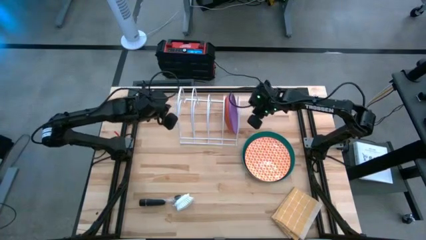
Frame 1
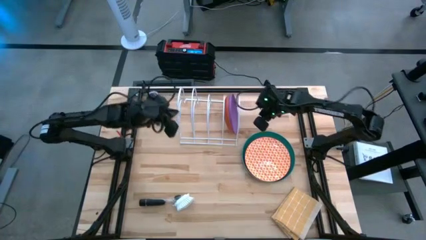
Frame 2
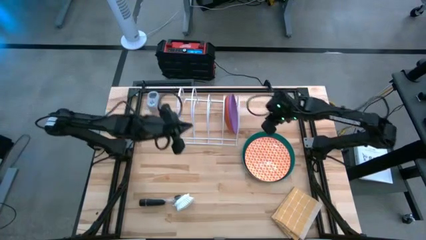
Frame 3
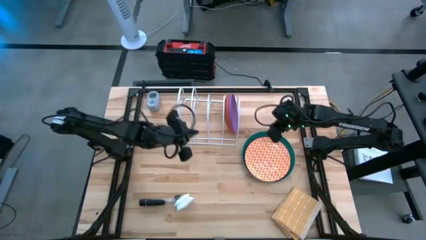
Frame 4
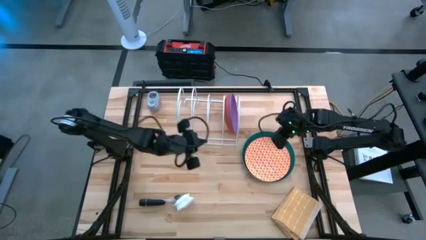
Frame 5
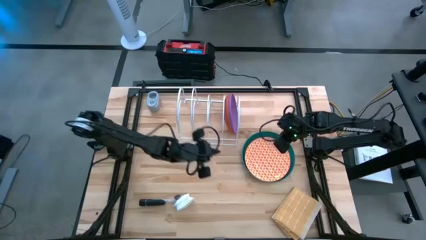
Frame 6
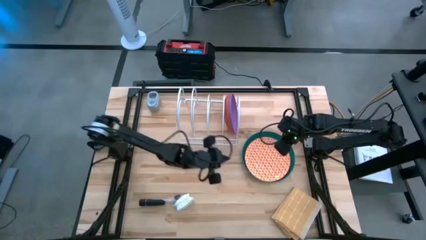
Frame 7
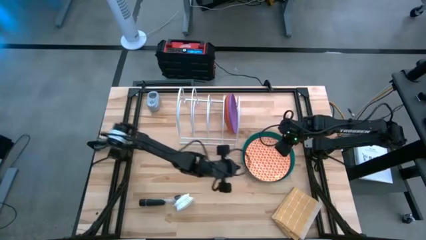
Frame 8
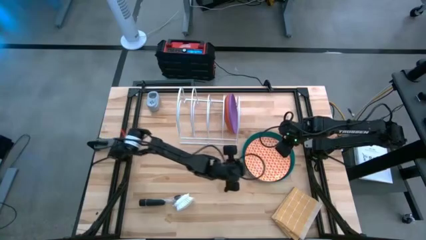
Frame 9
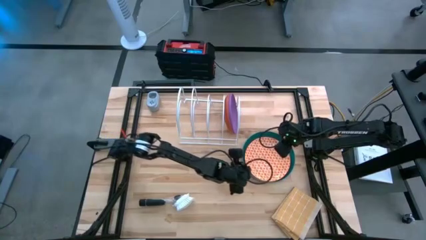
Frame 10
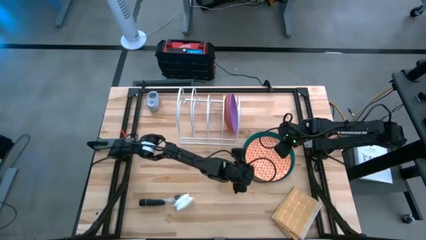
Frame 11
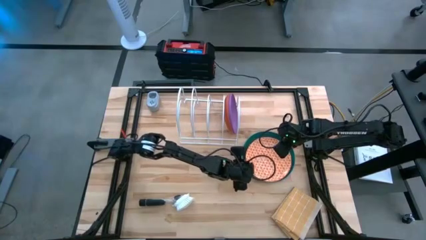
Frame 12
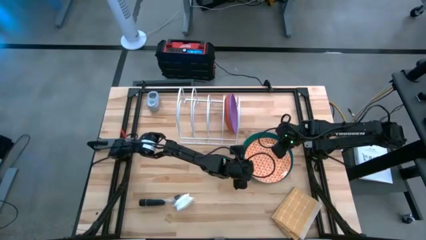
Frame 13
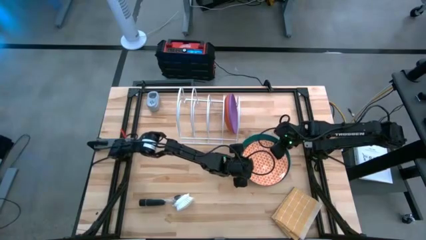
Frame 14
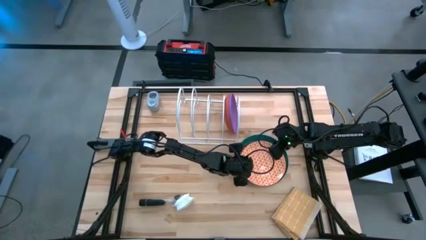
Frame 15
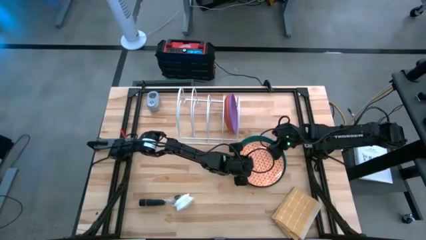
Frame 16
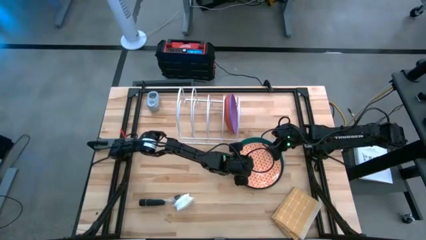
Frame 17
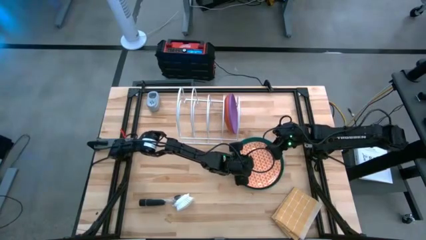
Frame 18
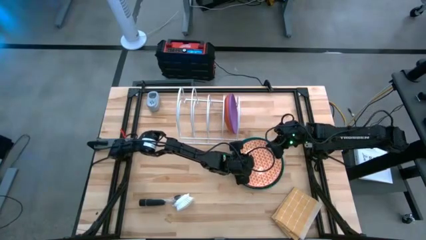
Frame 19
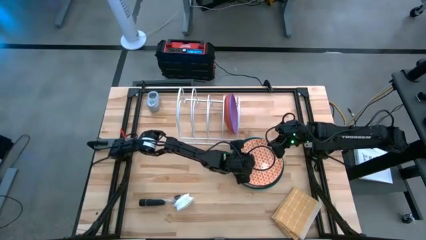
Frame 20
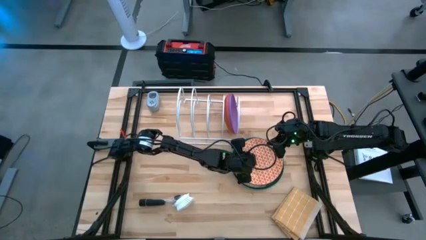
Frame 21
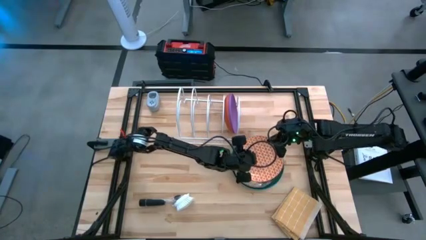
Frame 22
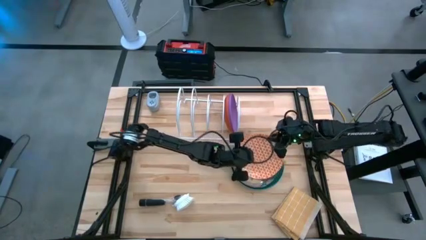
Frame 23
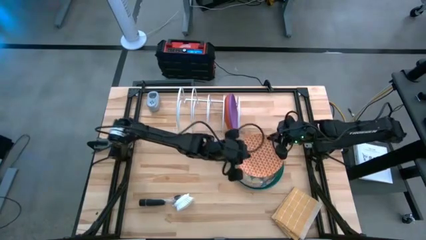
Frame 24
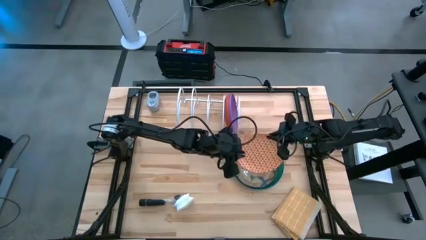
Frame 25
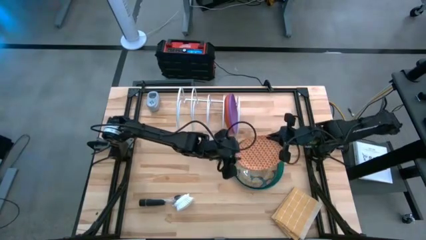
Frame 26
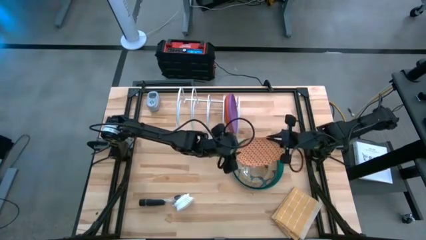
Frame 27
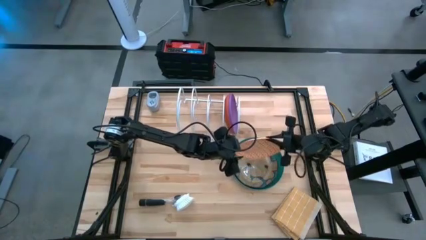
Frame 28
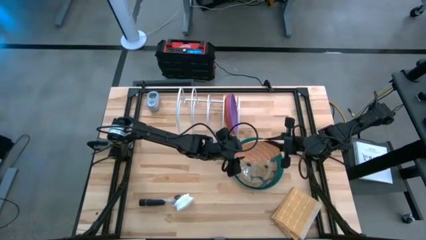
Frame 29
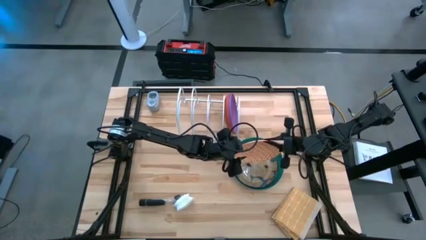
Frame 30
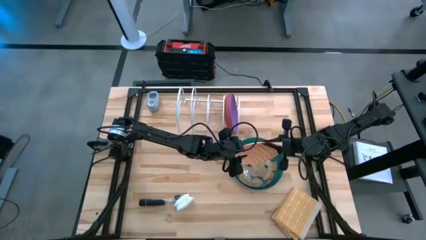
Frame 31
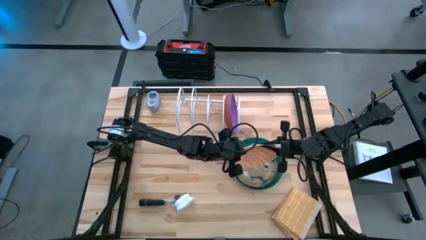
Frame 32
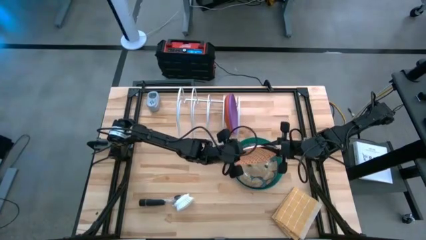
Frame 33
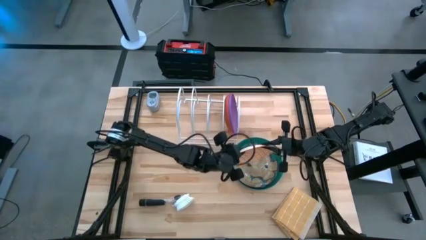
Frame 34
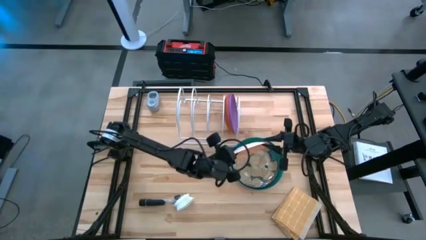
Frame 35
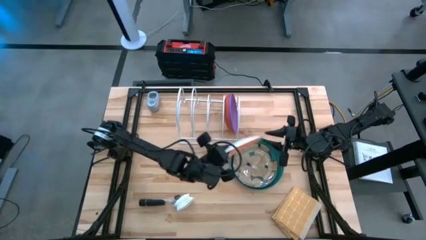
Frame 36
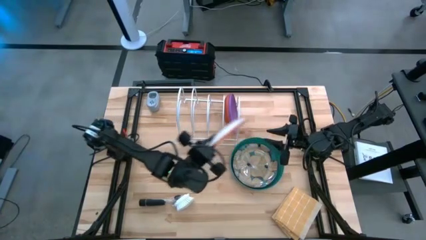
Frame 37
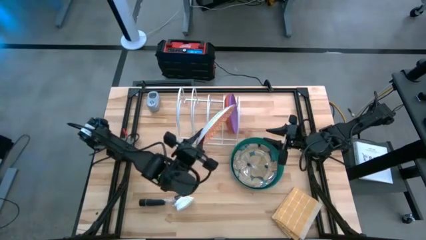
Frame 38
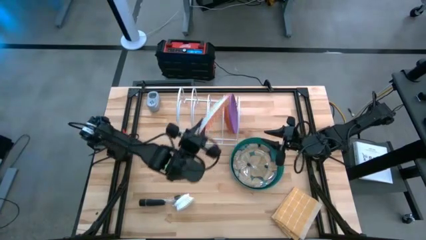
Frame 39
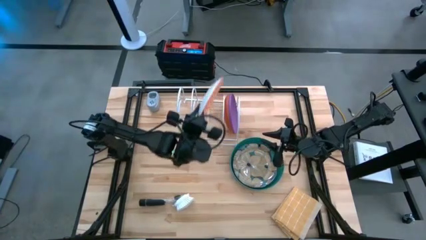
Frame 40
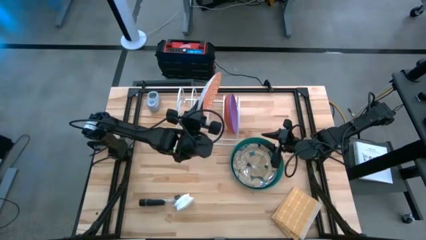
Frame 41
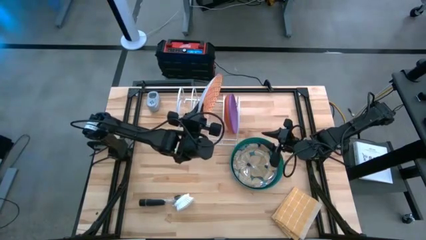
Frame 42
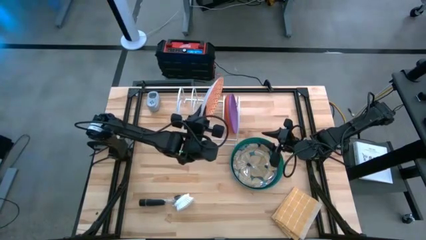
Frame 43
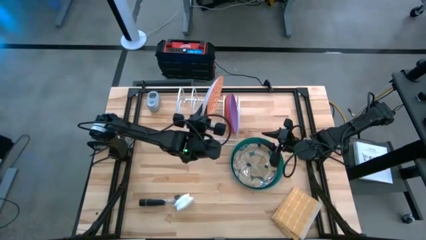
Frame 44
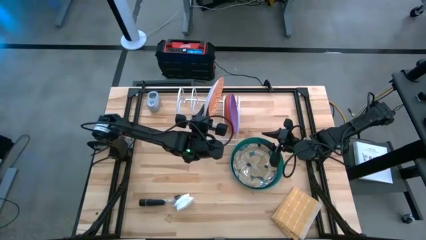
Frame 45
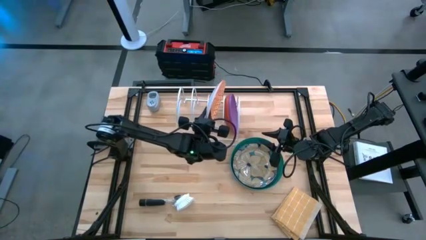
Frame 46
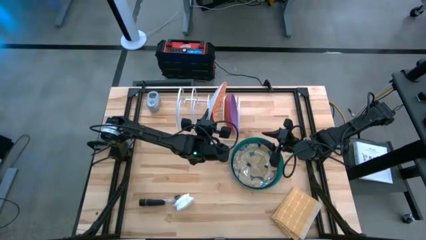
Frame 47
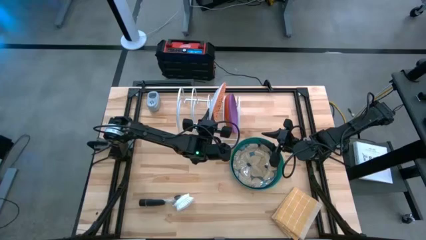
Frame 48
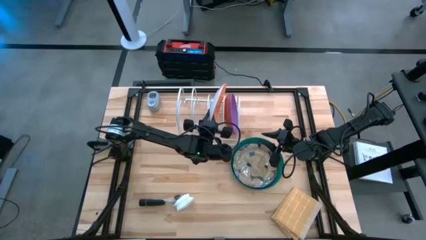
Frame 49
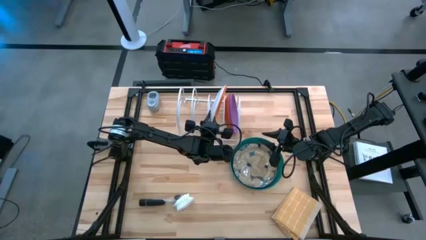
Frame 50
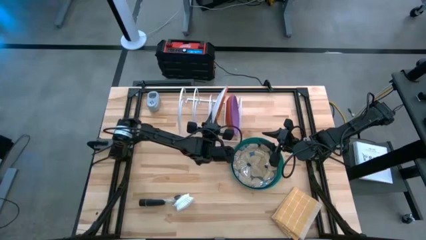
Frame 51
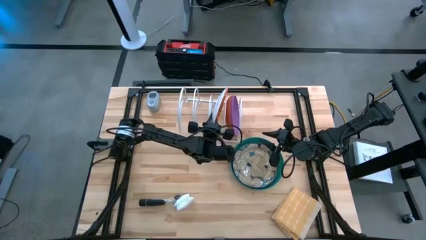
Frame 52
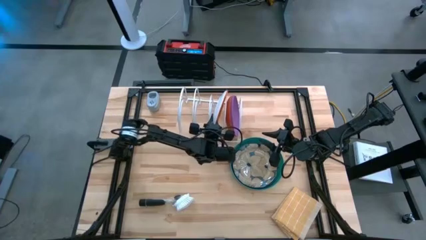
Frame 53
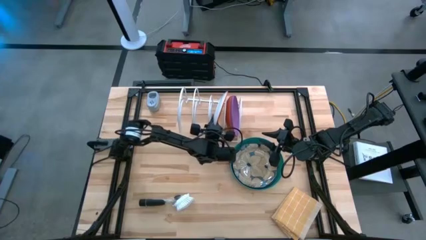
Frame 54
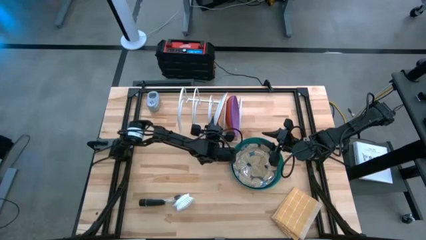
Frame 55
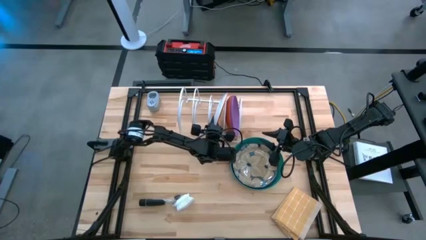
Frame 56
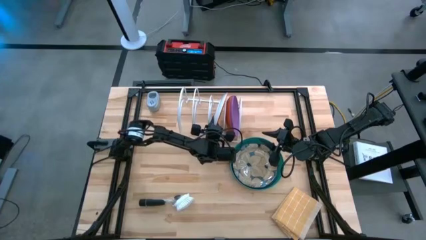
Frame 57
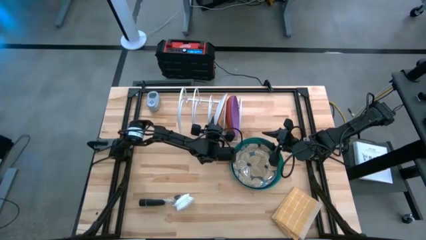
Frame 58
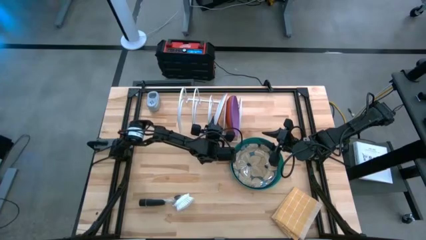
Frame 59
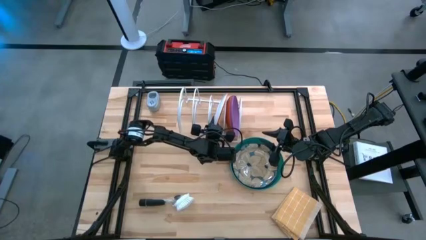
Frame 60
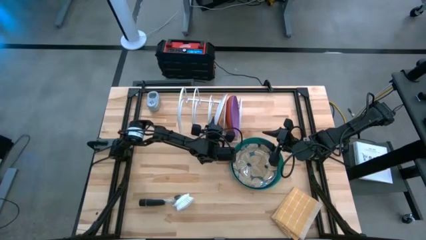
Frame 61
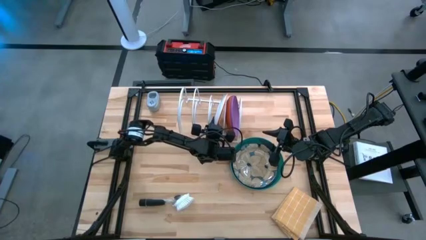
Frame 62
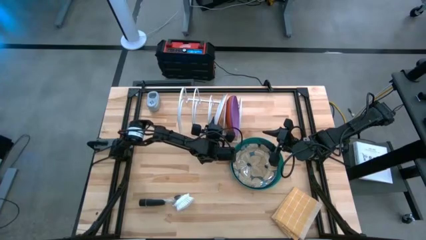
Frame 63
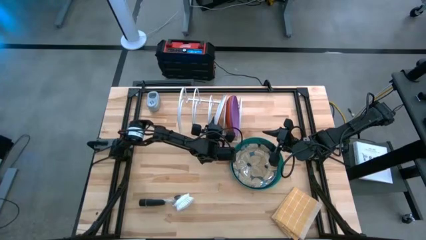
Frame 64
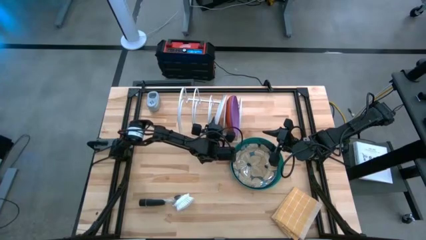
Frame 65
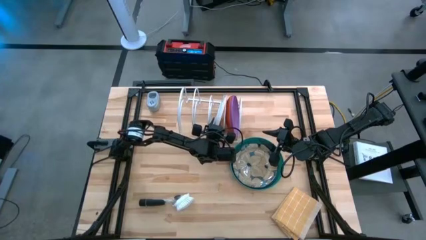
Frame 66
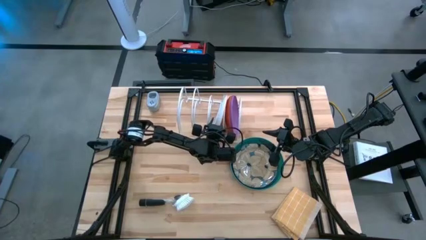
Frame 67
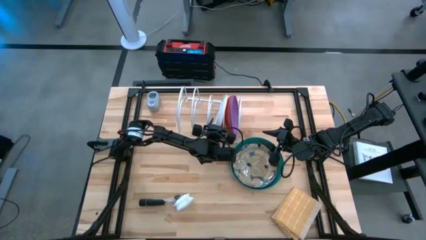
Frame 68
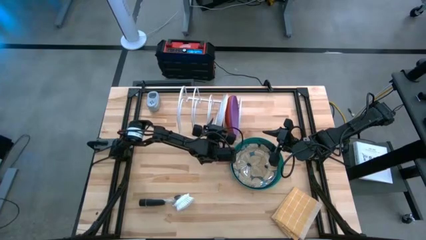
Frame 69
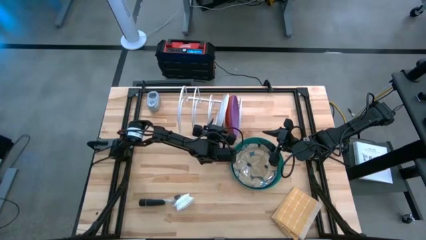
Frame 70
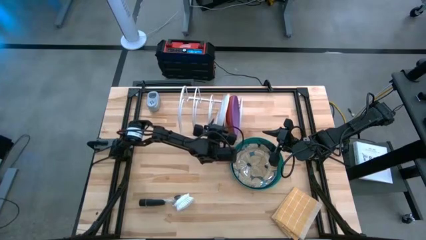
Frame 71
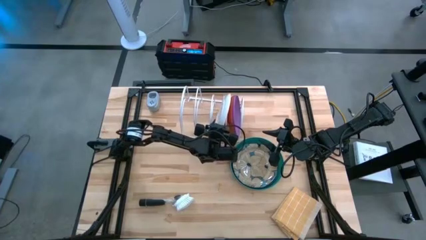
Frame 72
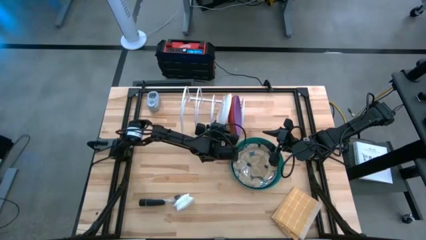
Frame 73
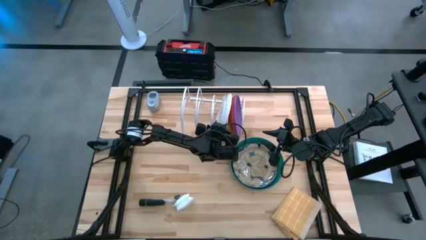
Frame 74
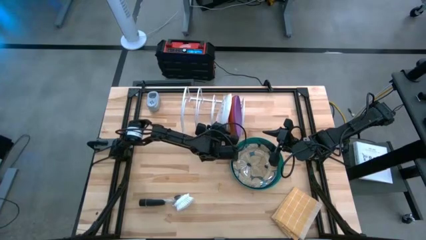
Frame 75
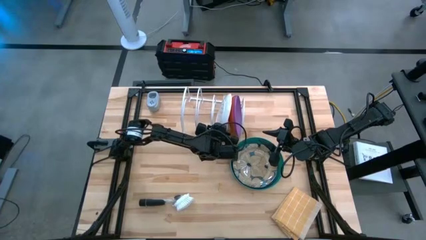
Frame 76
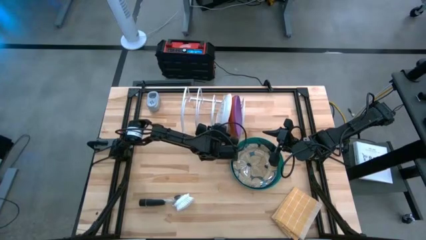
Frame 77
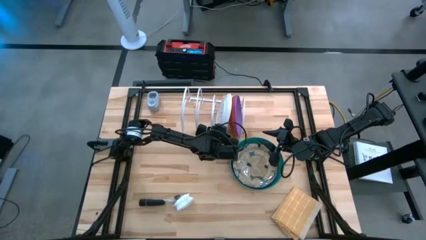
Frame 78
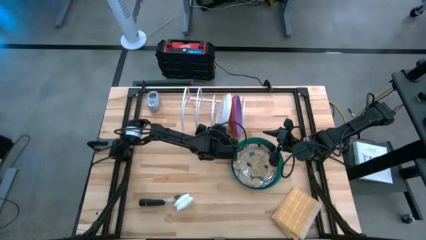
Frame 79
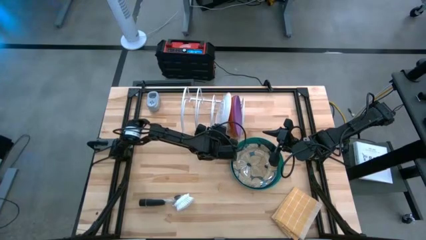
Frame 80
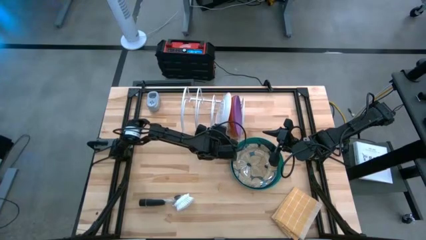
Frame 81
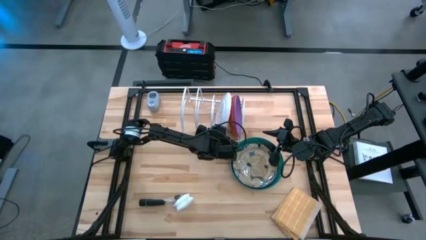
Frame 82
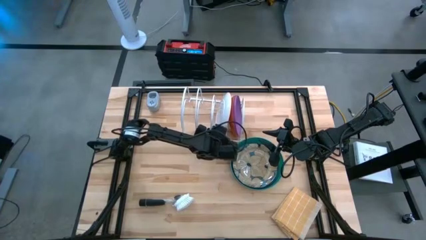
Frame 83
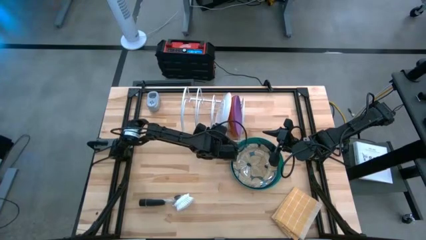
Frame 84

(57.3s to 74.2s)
Task: Sort dishes
Put the orange patterned plate into the dish rack
